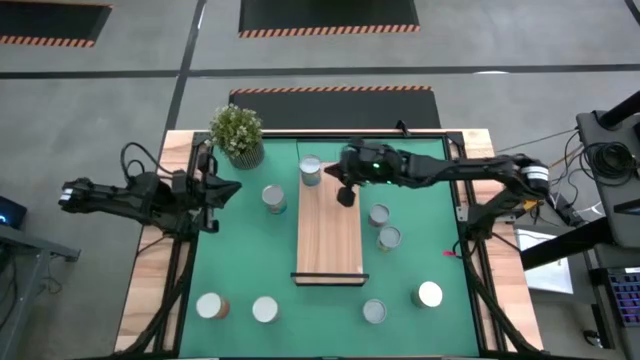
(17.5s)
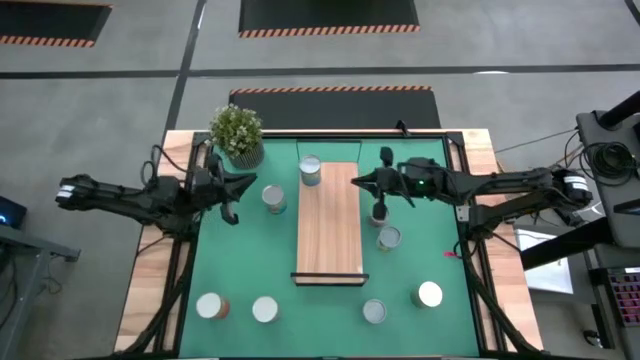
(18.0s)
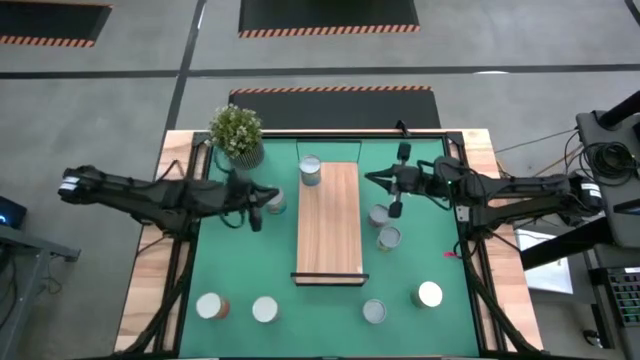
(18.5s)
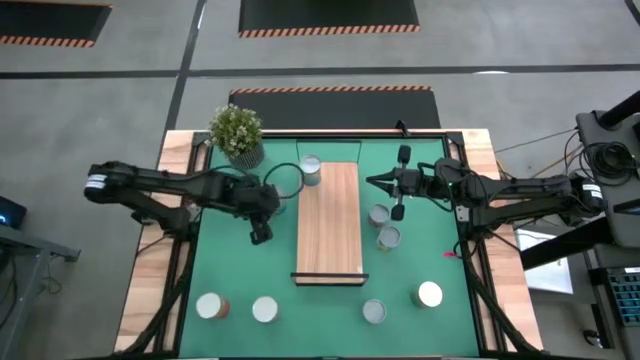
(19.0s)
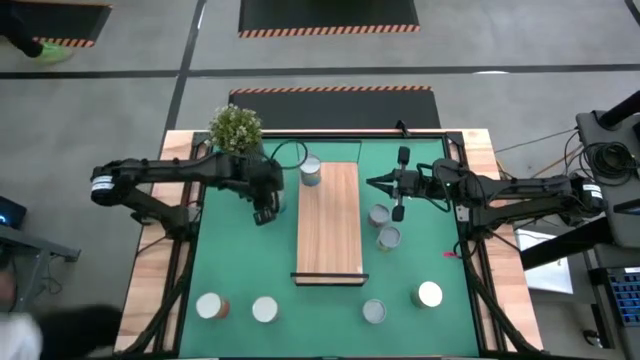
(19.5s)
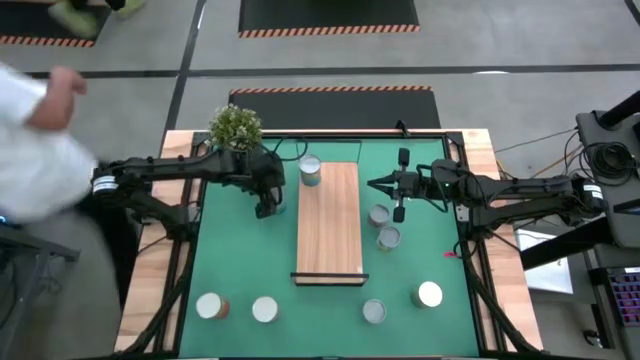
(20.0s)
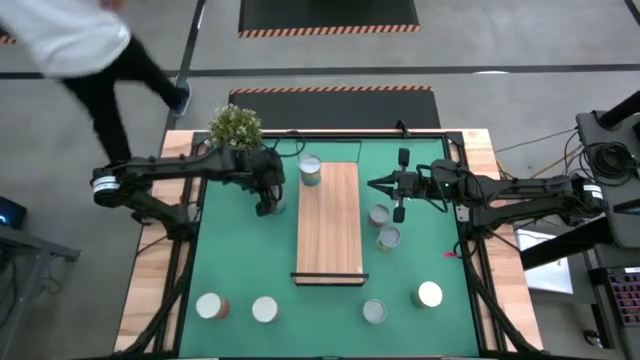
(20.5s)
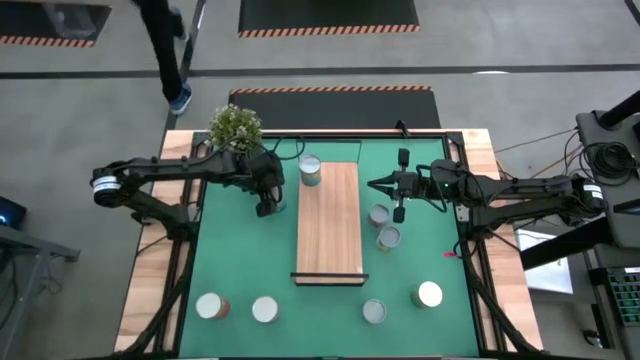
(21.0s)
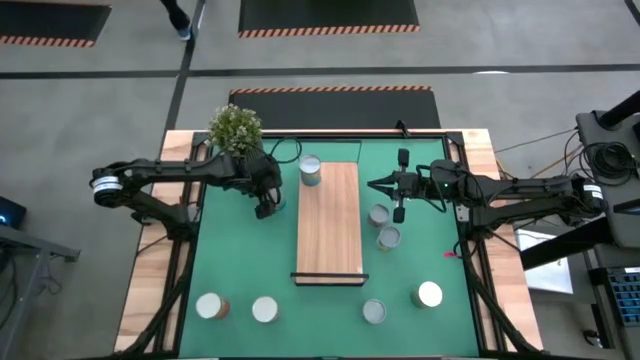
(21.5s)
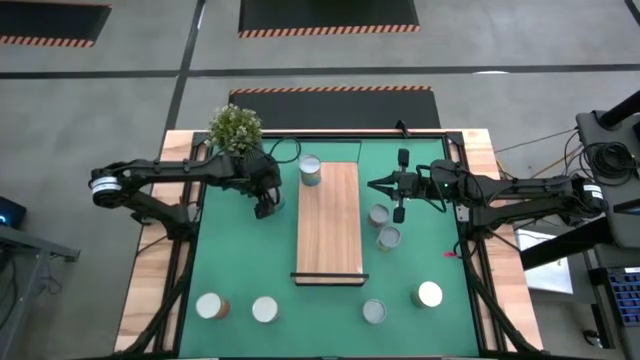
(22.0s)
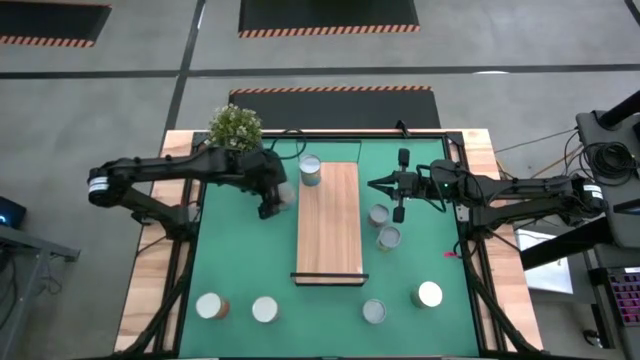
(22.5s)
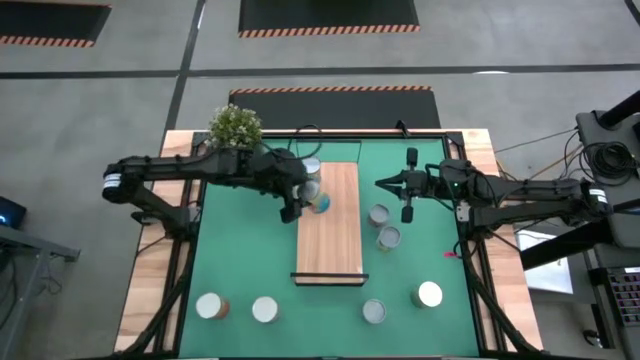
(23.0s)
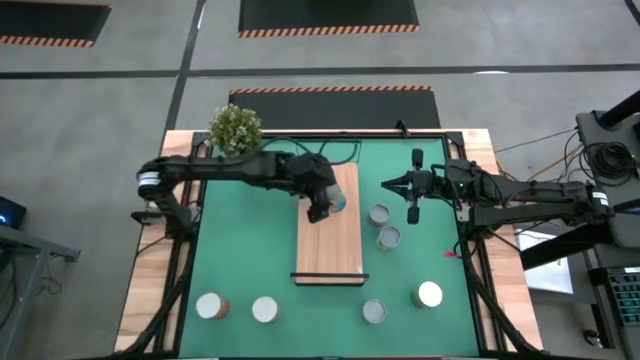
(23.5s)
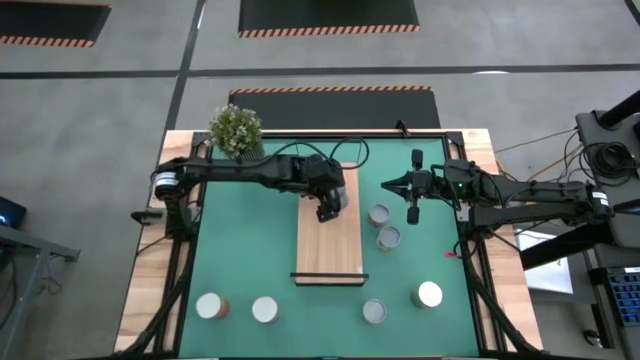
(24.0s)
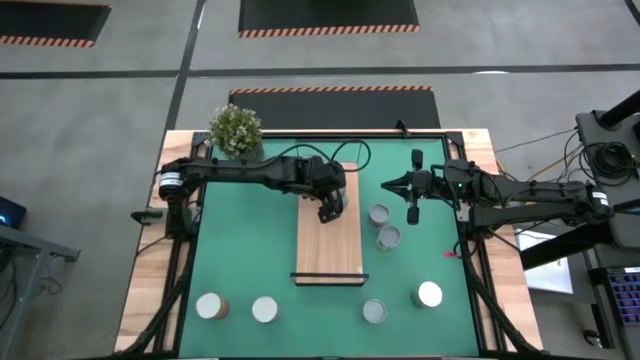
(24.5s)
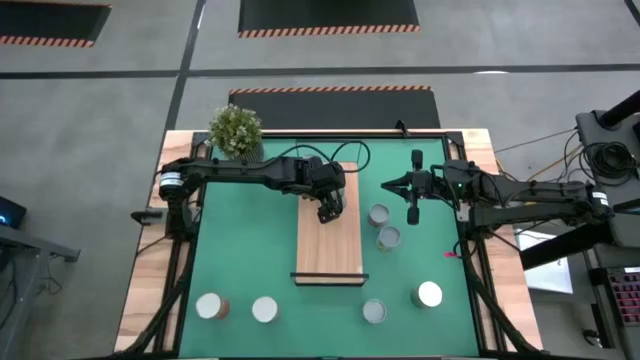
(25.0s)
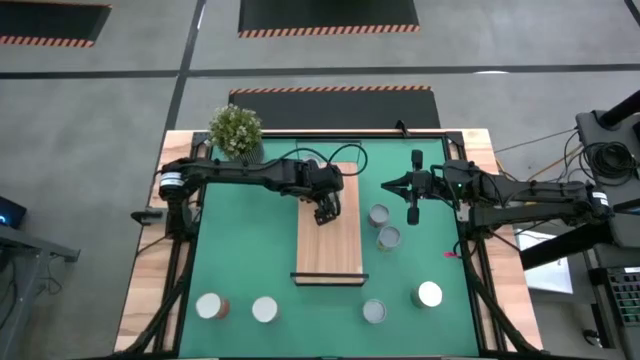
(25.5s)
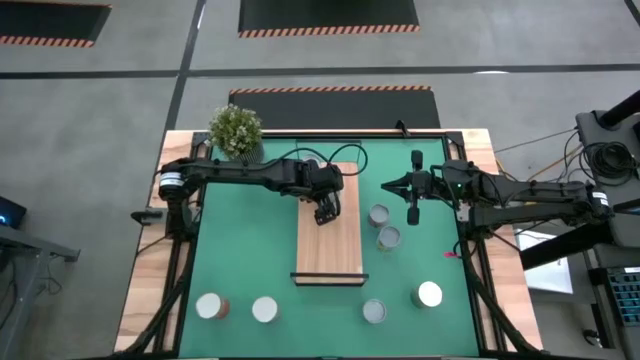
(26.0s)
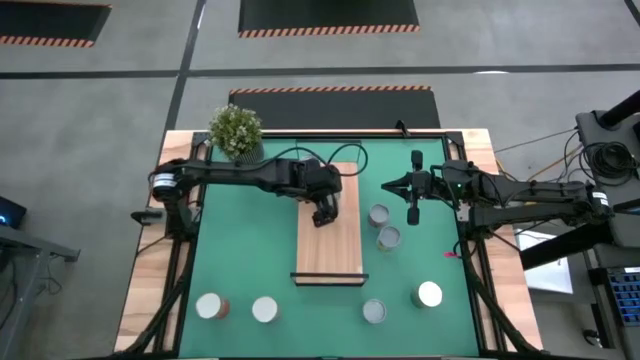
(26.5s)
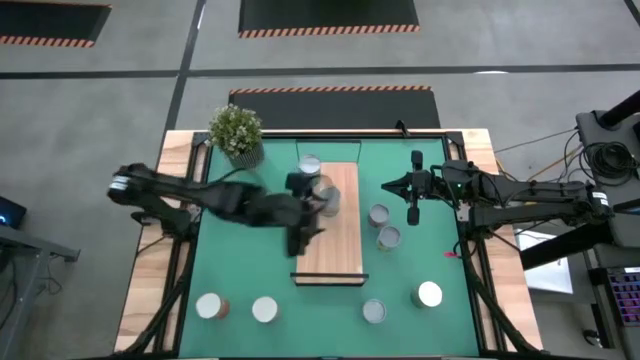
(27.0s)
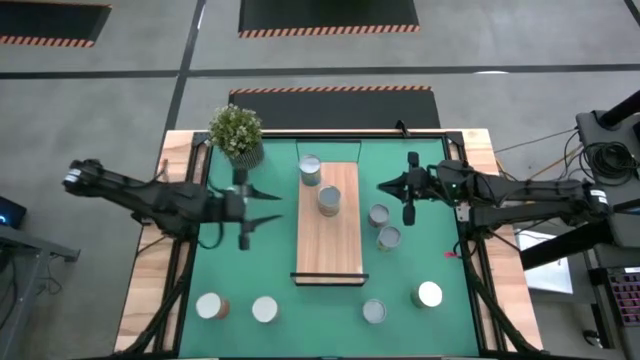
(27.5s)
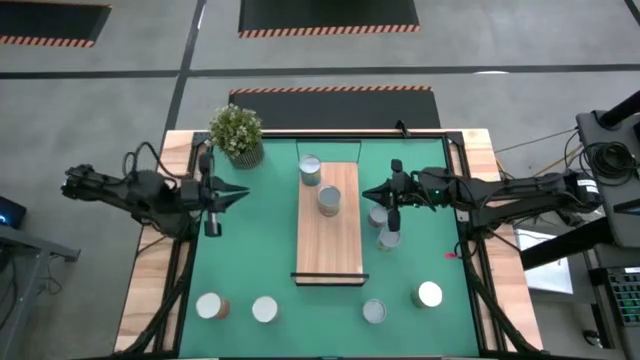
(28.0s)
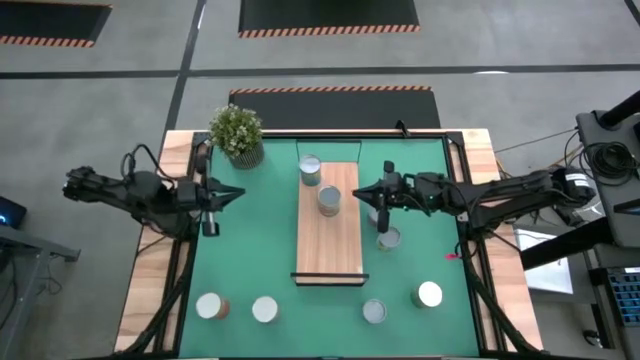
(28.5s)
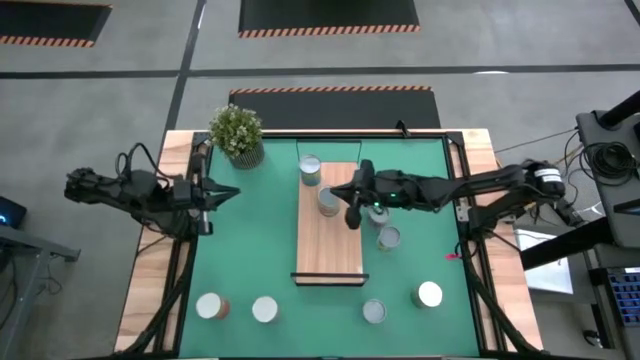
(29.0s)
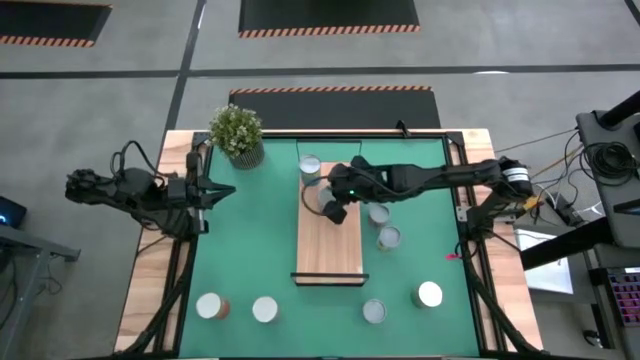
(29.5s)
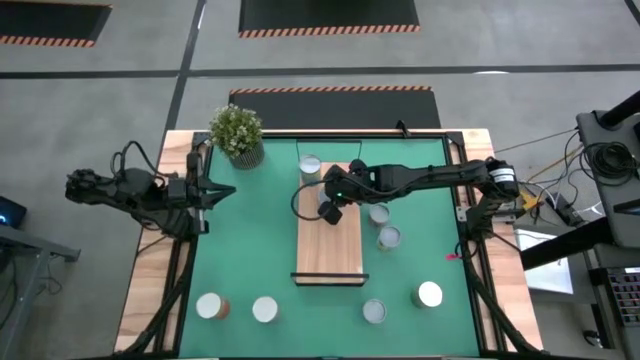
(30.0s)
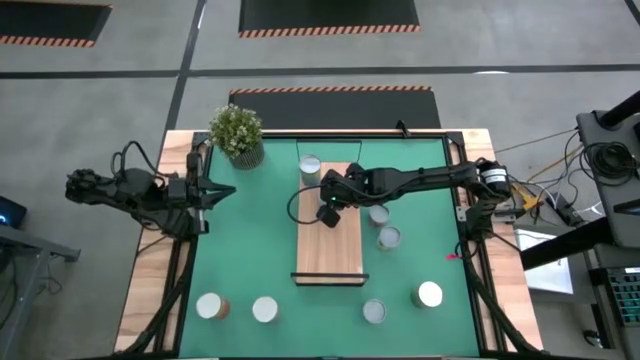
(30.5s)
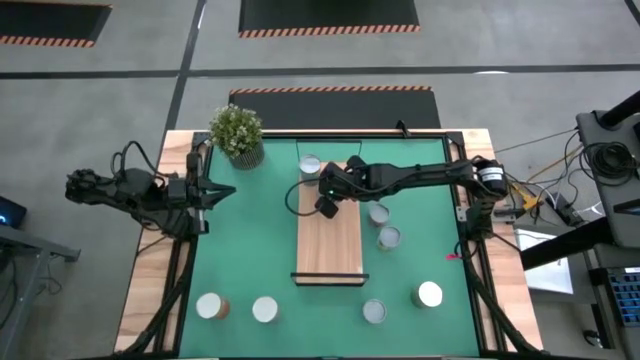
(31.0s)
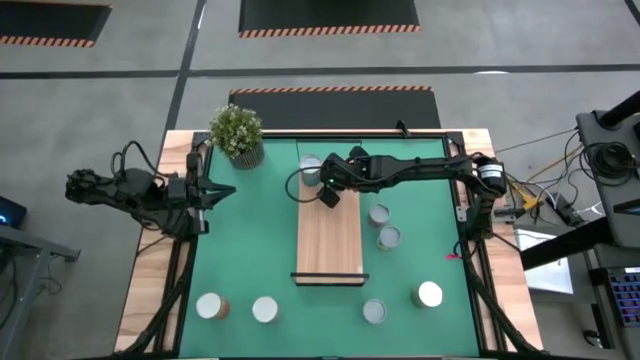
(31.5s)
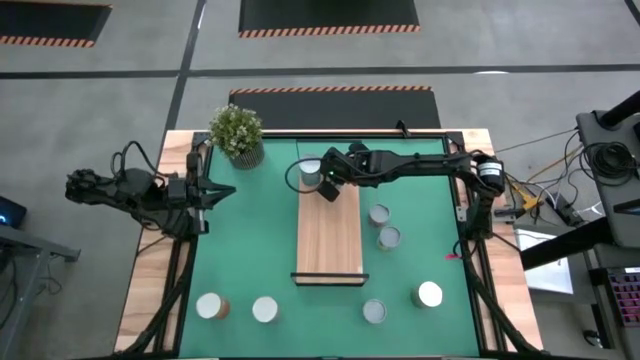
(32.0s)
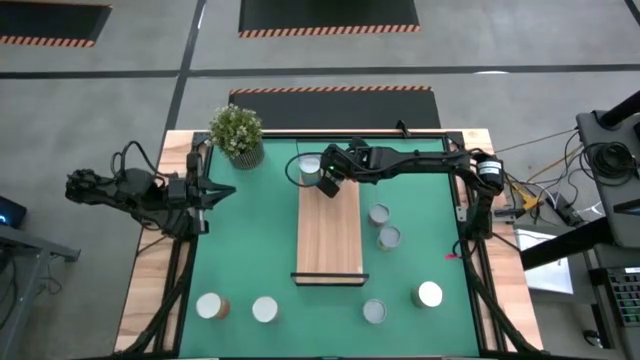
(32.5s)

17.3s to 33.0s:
Task: Pick and place cans onto a shelf
Put the canned tomatoes on the shelf

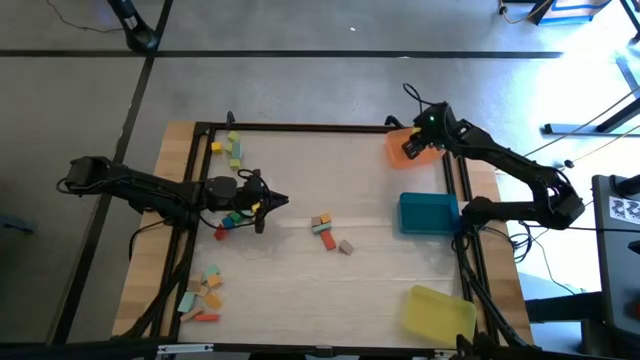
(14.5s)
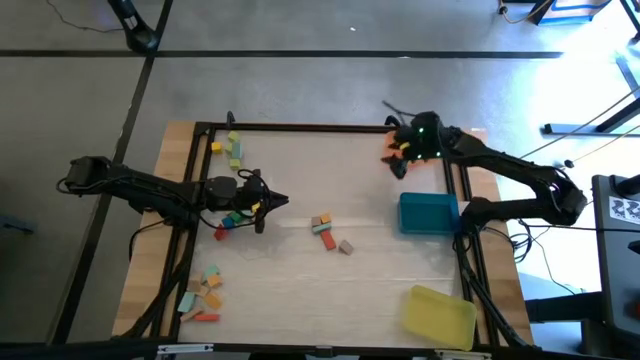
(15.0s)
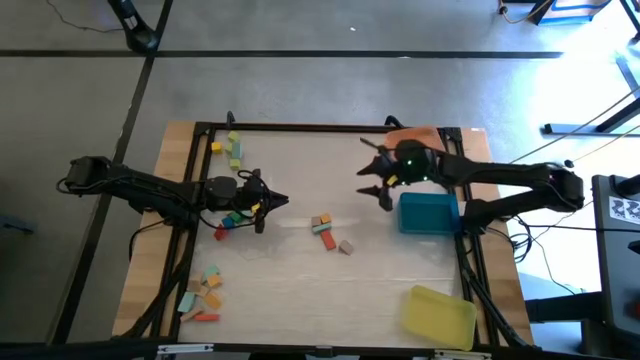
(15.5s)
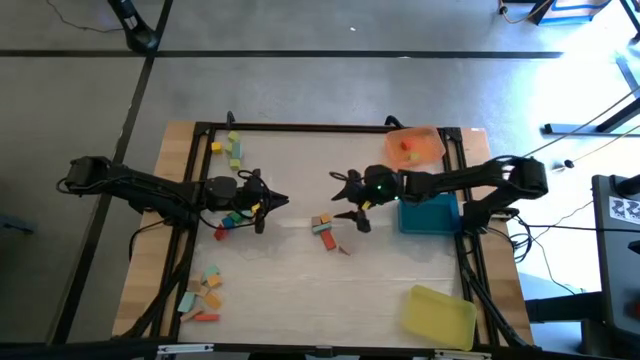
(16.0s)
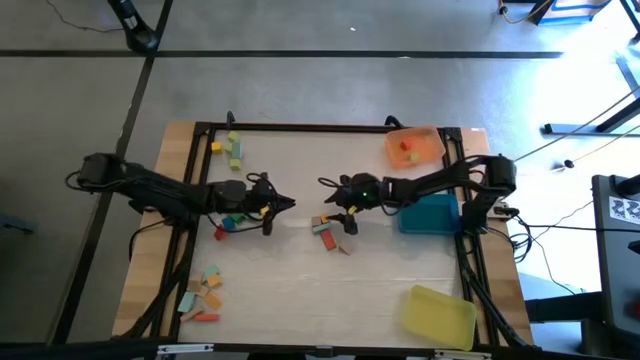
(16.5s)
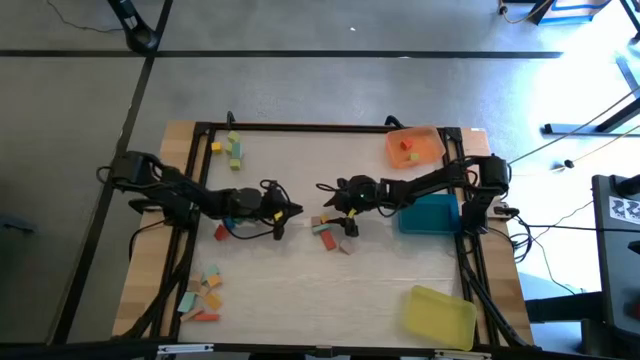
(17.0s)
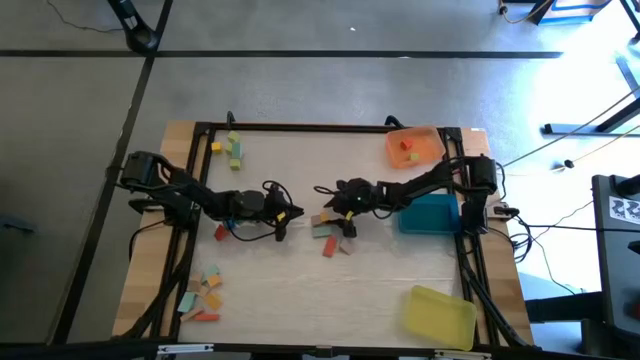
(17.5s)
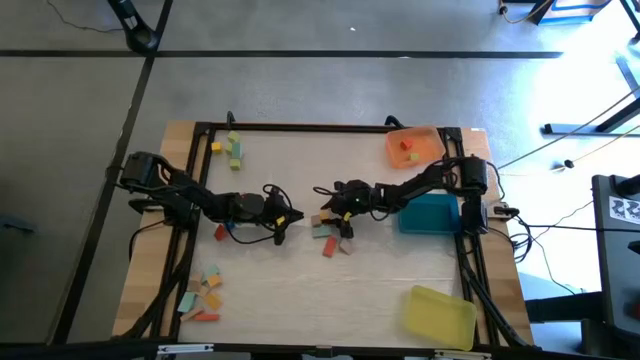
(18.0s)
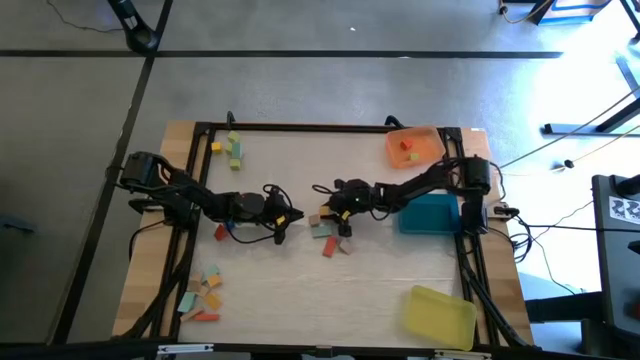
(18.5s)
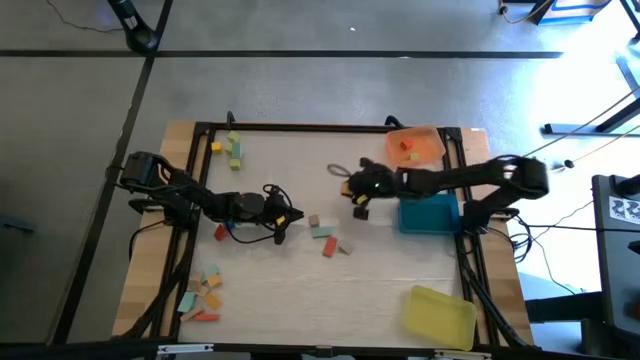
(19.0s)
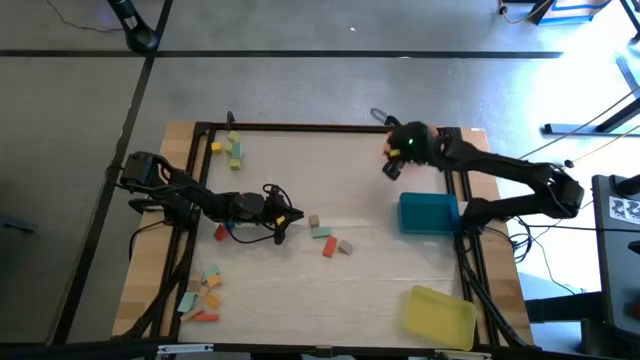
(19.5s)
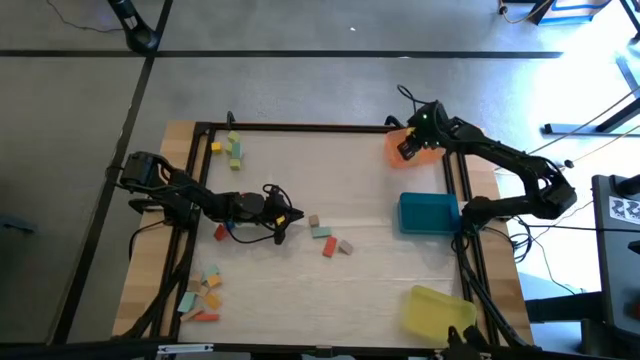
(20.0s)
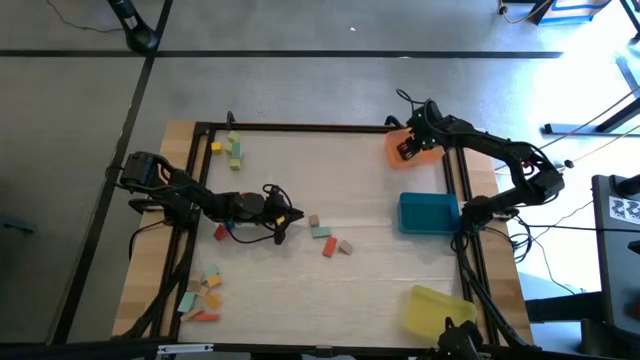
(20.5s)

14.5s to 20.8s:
Task: Sort blocks by size
Put the light yellow cube block into the orange bin
